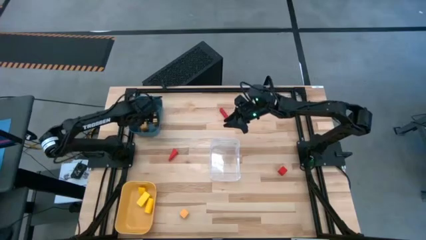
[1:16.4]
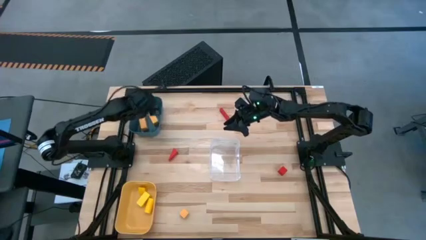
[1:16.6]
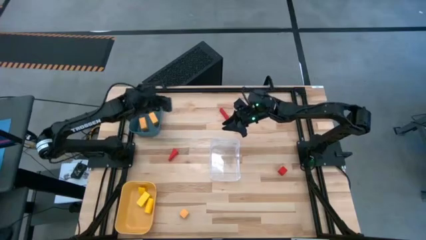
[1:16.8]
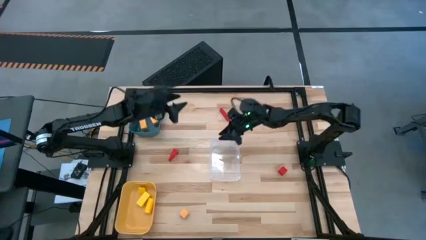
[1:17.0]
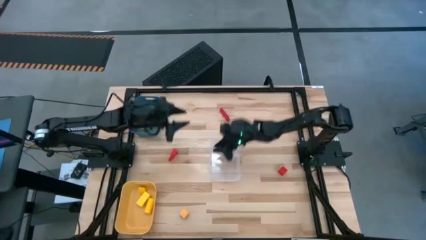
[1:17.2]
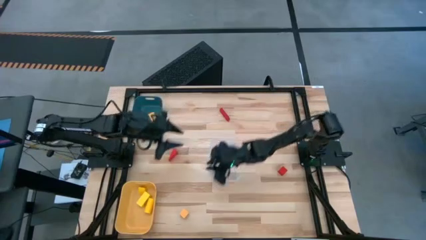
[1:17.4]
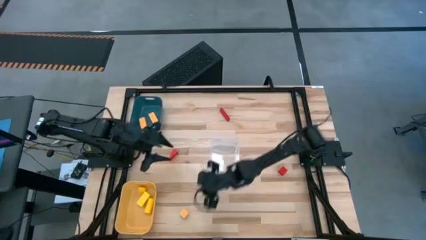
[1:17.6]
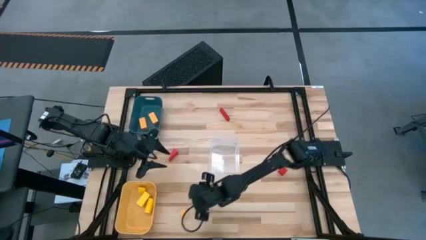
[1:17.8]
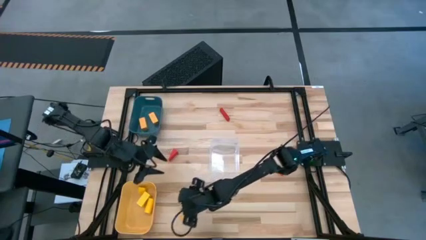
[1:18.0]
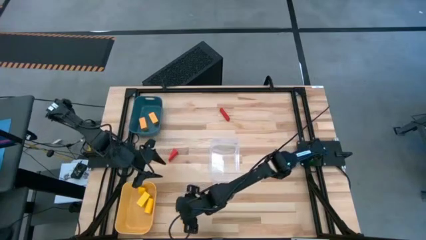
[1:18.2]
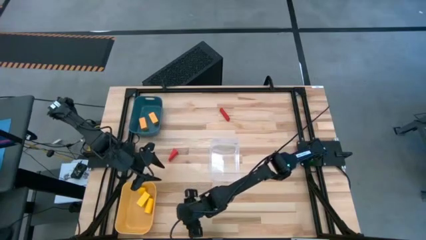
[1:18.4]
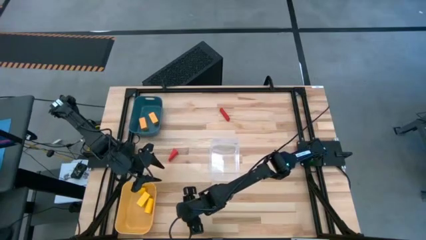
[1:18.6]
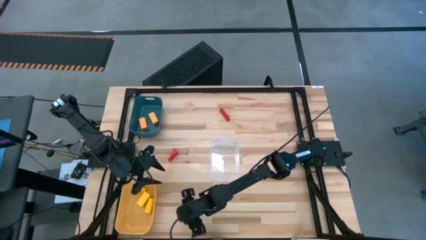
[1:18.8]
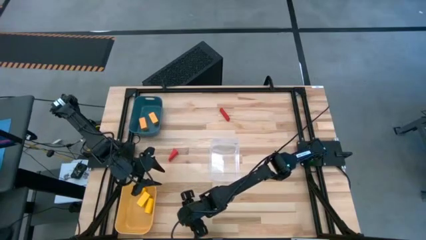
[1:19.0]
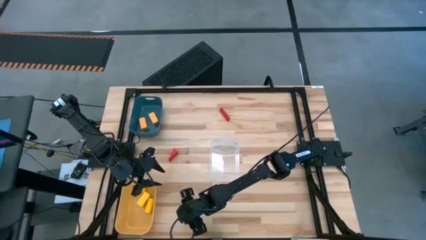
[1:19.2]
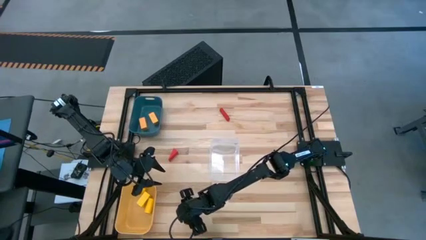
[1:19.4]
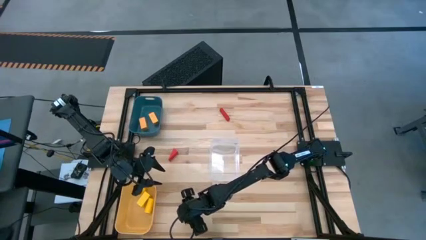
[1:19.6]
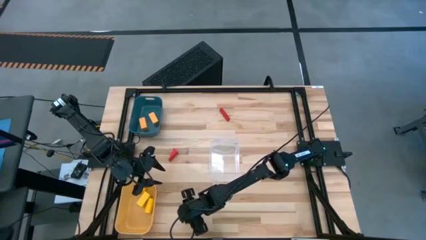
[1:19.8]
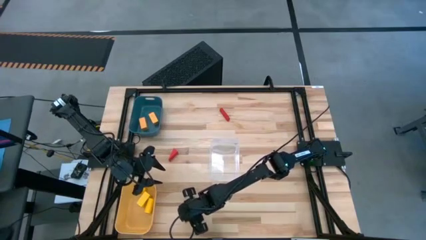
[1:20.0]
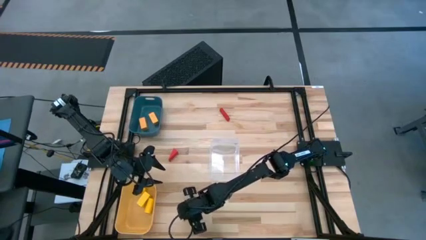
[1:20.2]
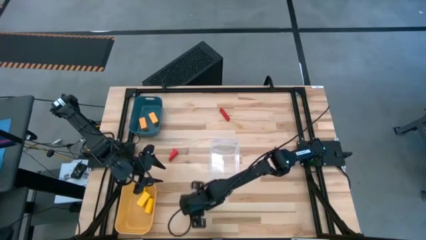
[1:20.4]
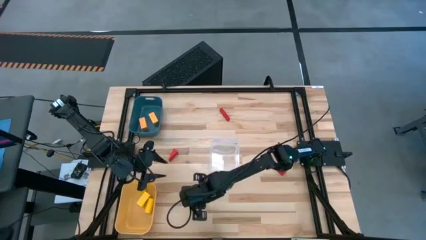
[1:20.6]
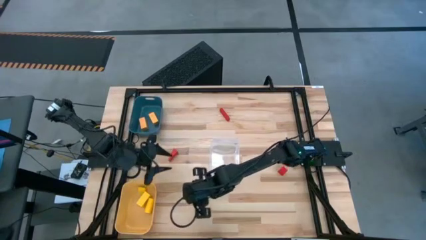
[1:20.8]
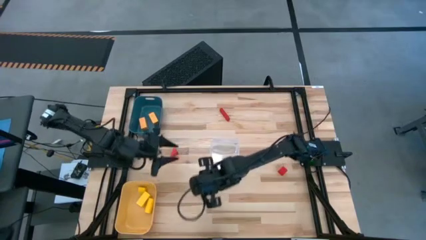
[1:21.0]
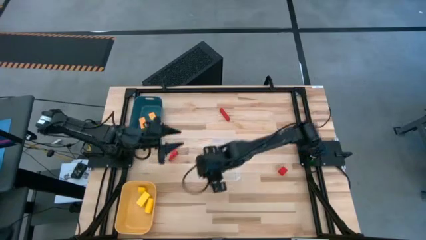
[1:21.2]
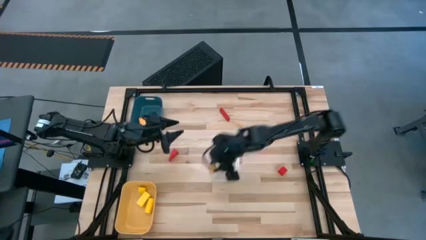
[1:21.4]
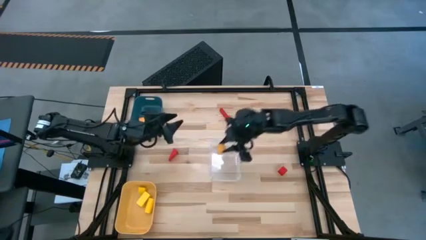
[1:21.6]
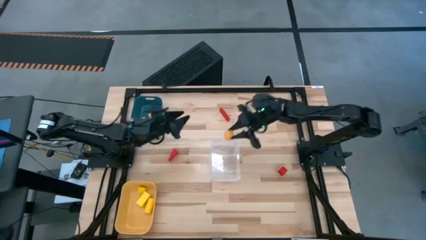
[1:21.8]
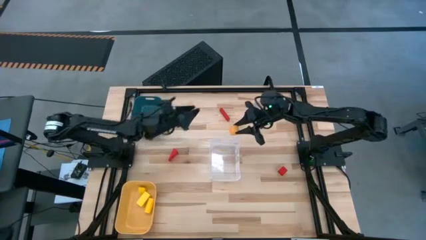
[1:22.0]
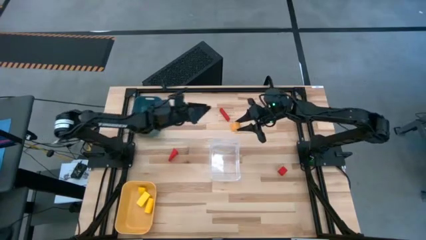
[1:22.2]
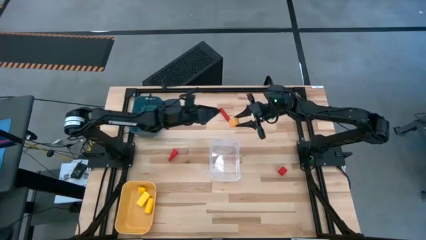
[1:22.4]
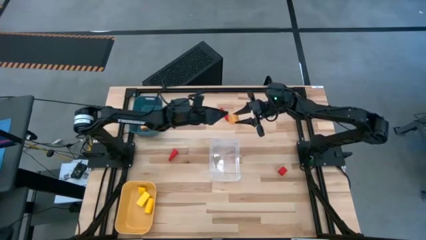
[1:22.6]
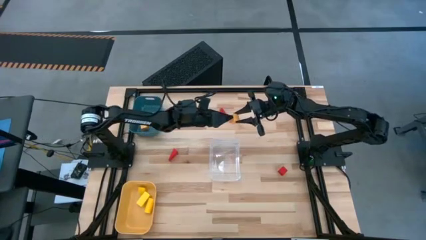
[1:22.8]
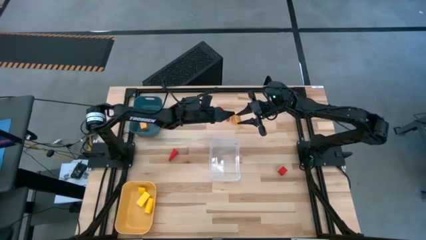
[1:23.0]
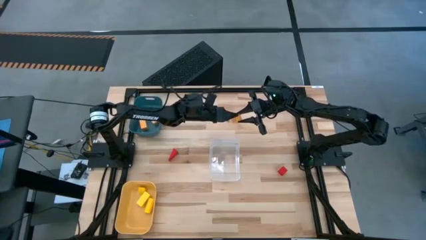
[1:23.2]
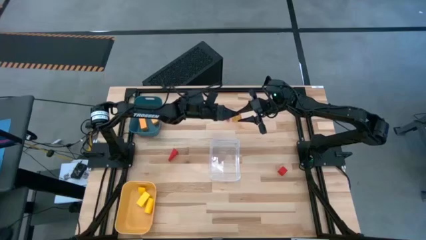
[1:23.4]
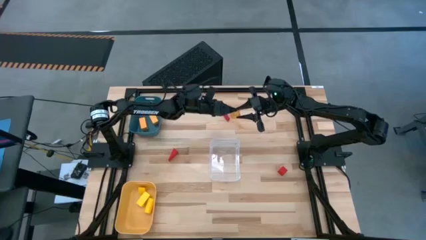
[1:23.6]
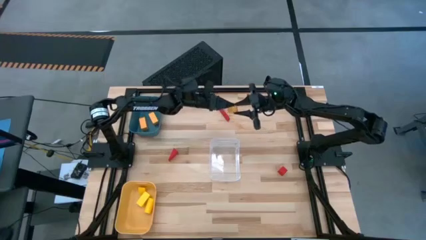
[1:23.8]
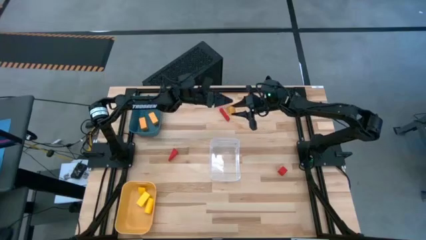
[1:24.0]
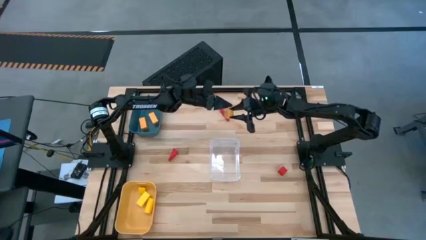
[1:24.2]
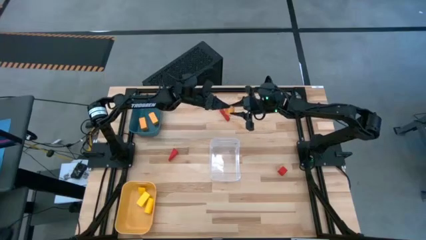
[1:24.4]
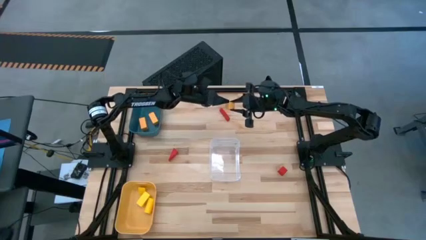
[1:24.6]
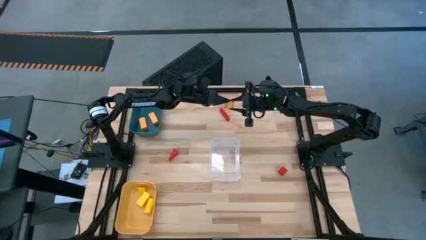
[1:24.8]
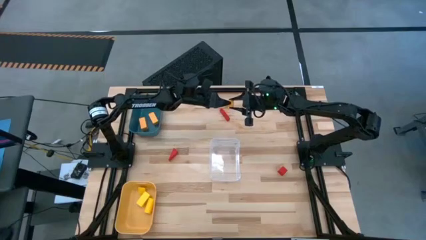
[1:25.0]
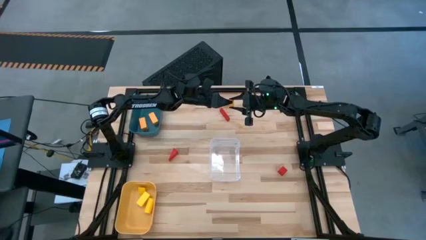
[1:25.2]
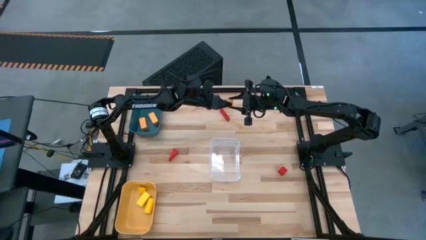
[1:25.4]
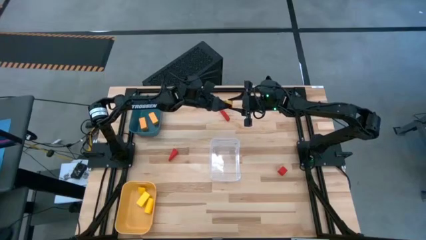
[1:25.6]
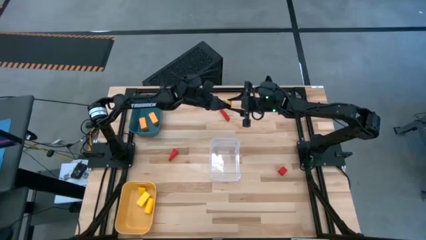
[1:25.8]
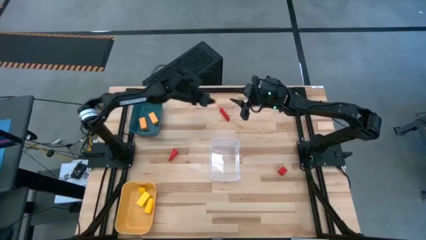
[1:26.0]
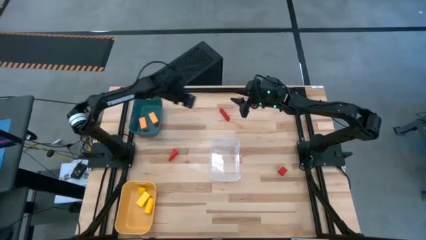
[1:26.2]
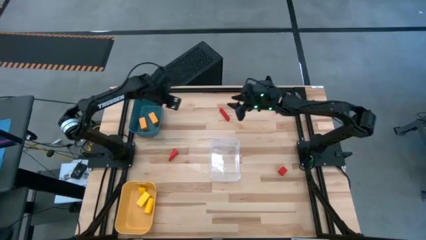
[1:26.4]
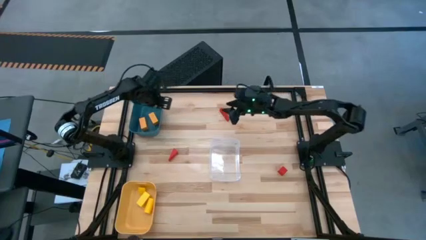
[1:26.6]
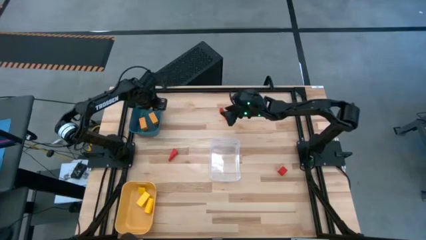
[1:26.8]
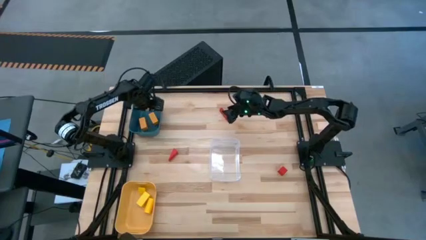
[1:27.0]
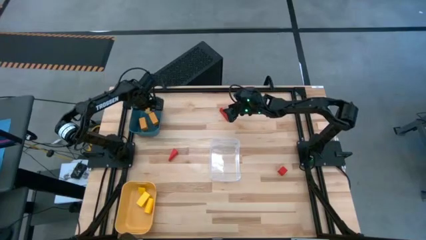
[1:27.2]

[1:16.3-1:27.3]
Task: Sort & place blocks by color
Put the orange block into the blue bin

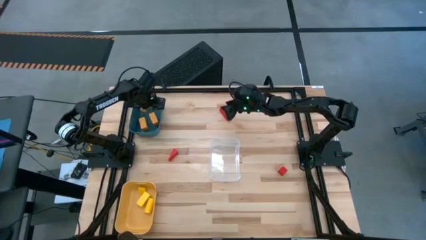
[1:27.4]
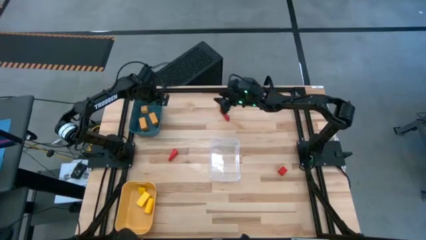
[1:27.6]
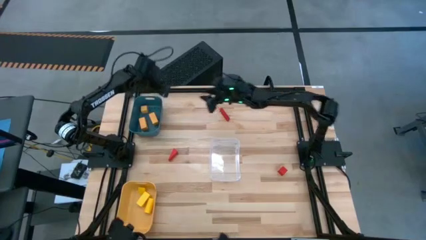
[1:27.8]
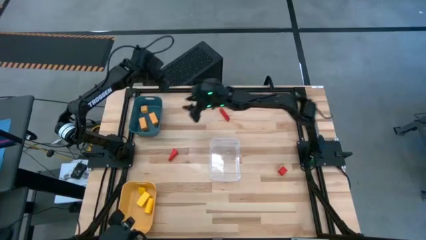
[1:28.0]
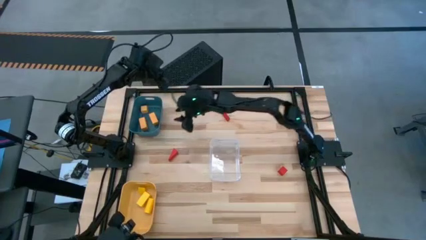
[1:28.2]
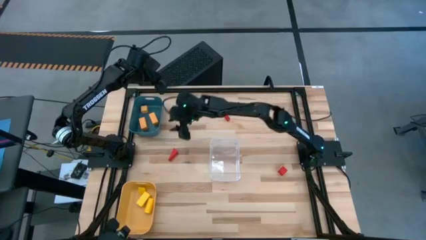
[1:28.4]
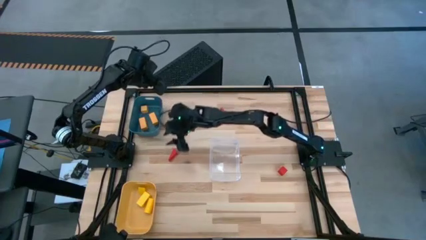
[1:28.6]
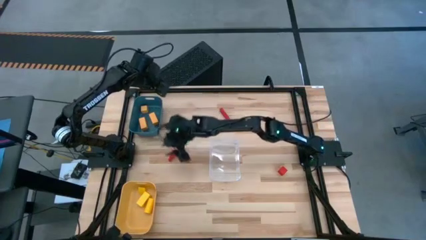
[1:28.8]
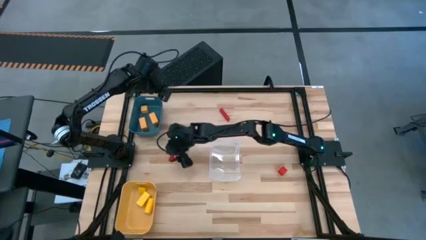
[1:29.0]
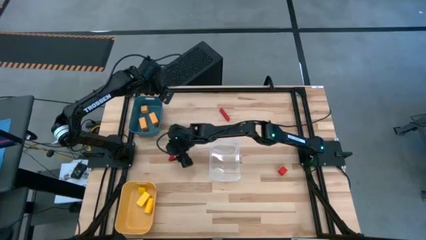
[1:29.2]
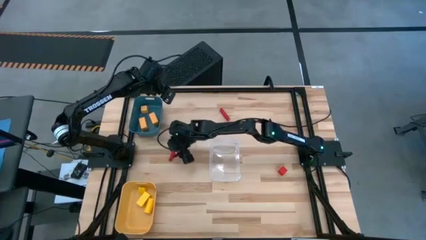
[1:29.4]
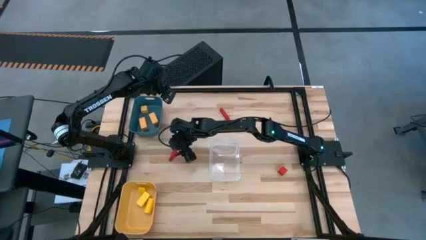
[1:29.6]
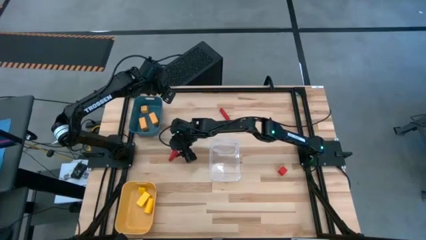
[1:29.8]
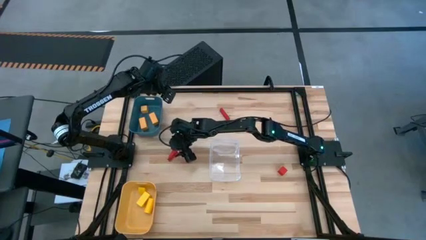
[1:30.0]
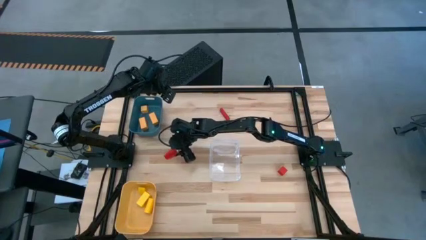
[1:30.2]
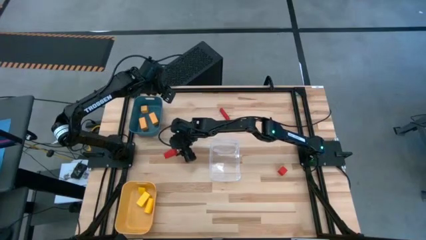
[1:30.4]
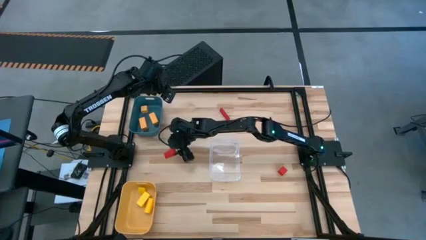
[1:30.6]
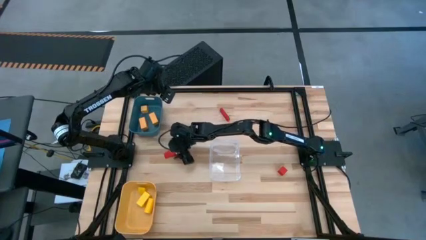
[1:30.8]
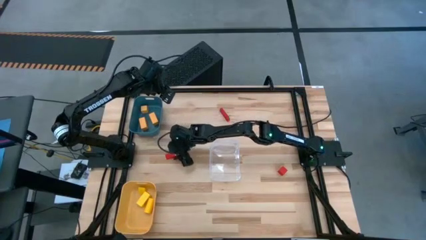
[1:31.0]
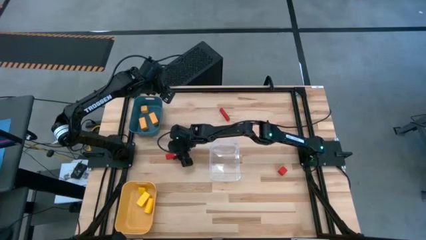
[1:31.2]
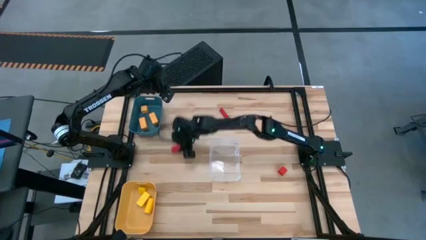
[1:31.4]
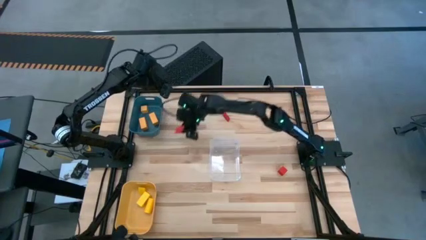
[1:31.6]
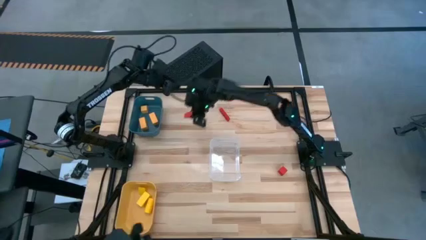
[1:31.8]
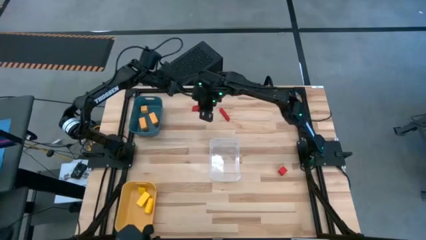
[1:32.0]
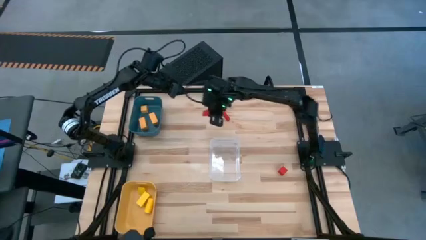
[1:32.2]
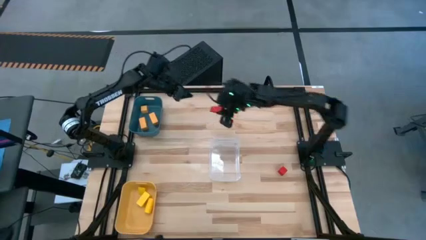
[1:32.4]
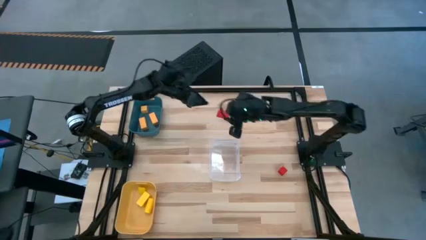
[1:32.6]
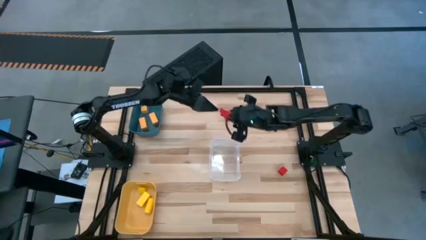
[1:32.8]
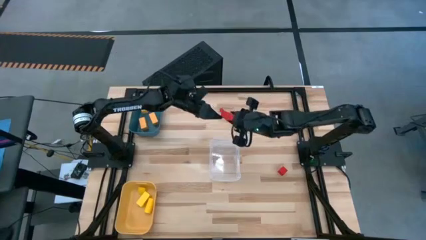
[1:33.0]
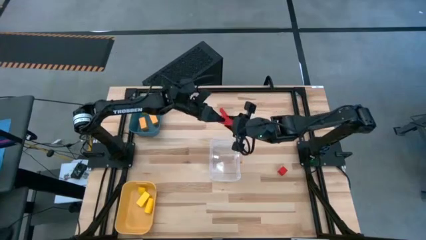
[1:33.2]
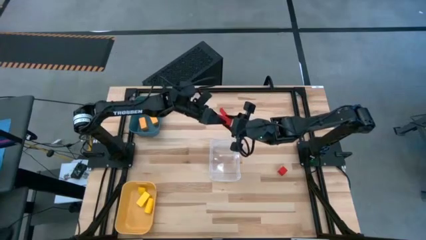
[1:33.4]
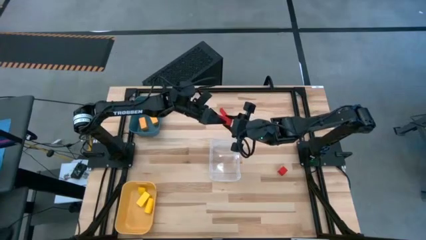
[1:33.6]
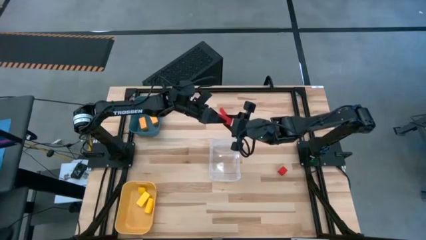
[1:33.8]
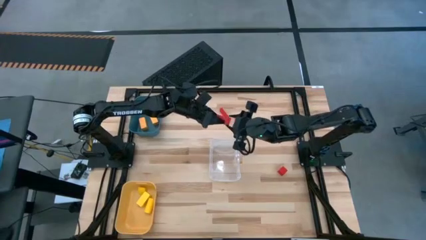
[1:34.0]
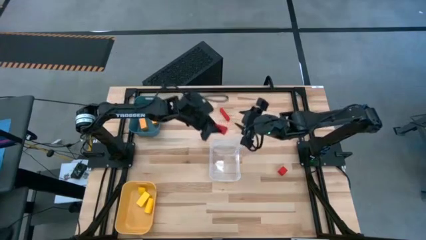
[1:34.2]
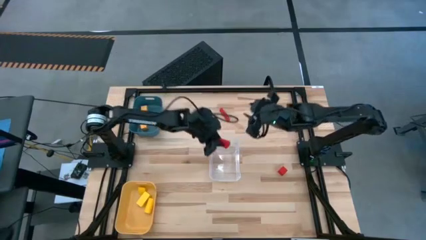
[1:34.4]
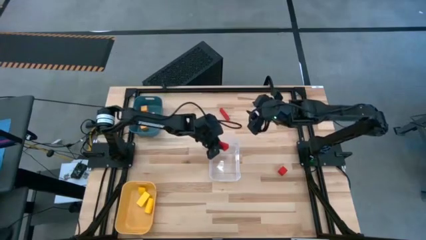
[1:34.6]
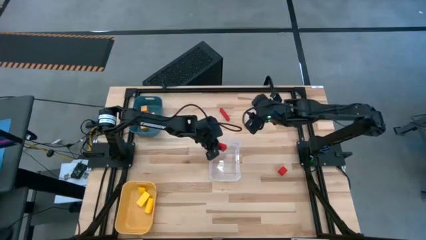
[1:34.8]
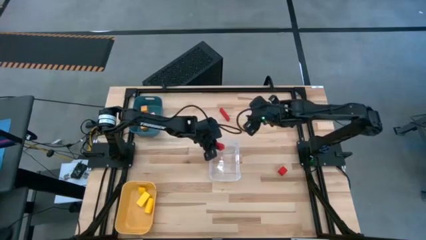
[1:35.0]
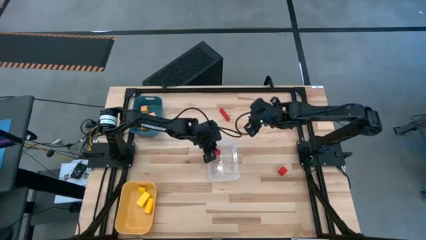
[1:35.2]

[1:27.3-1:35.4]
Put the left red block into the transparent bin
